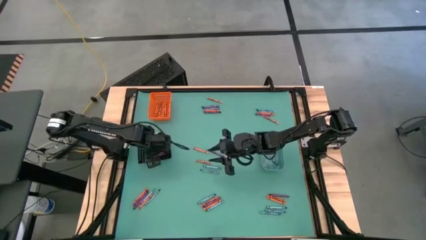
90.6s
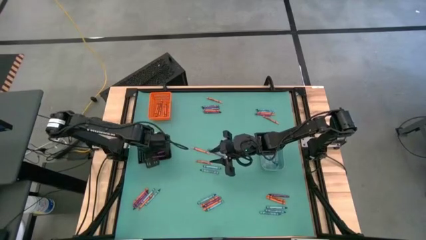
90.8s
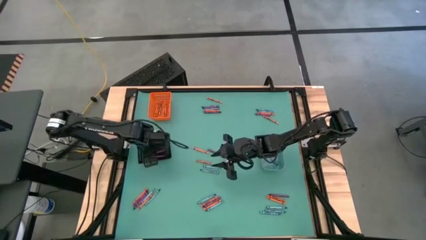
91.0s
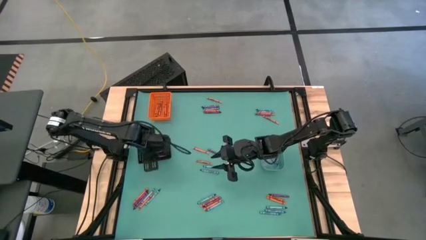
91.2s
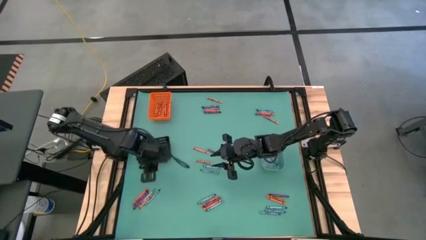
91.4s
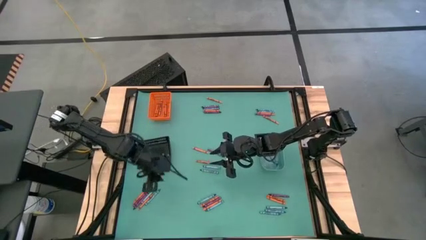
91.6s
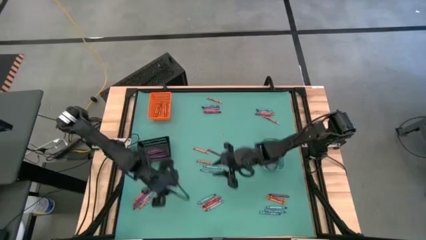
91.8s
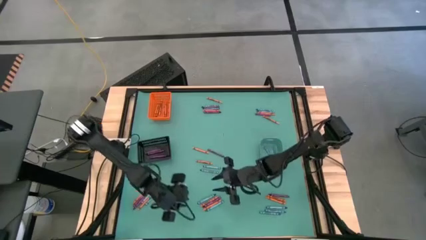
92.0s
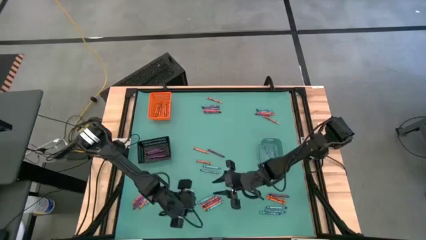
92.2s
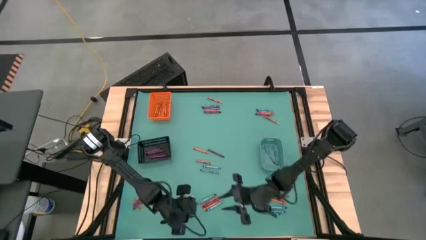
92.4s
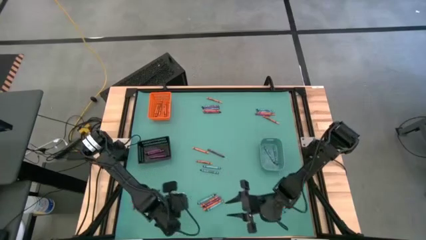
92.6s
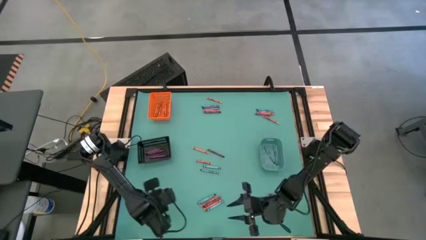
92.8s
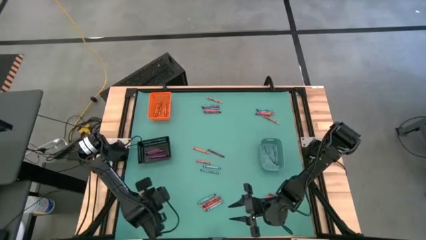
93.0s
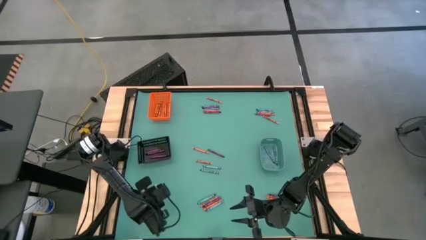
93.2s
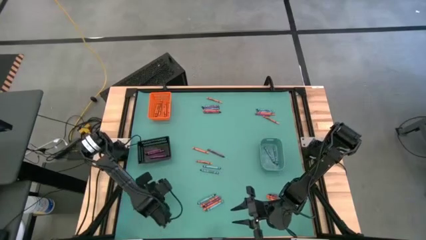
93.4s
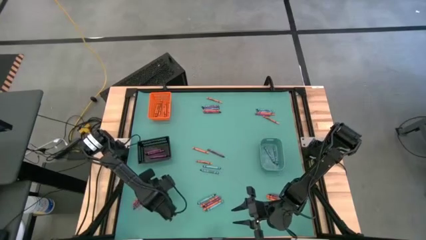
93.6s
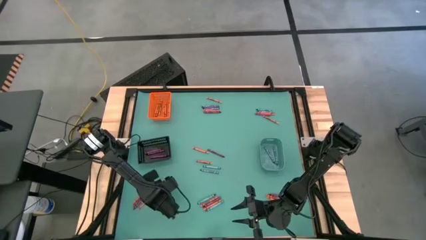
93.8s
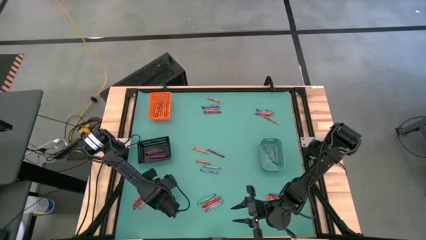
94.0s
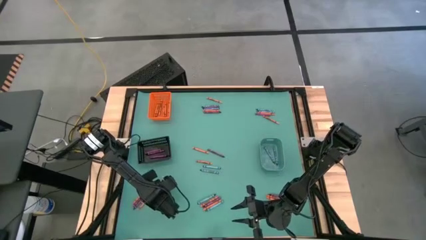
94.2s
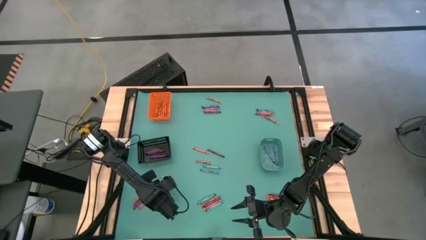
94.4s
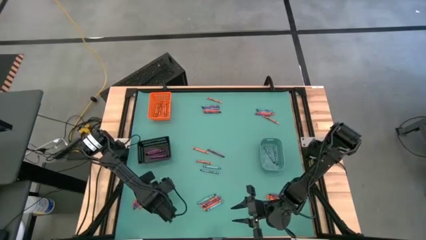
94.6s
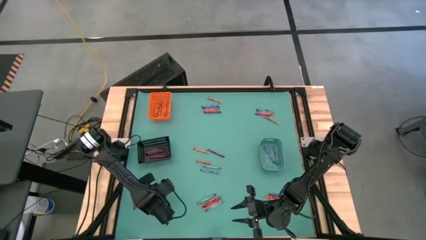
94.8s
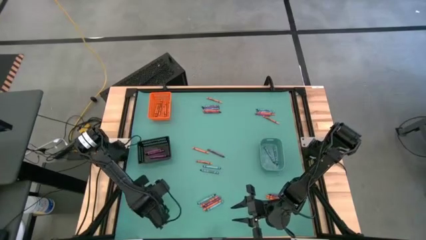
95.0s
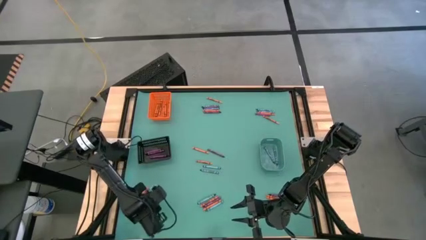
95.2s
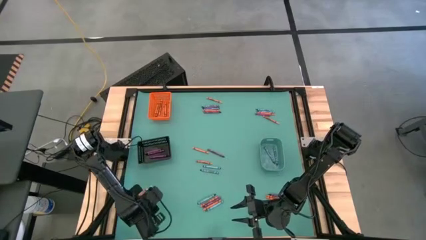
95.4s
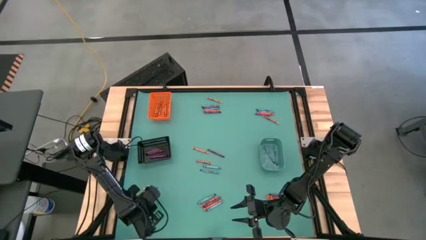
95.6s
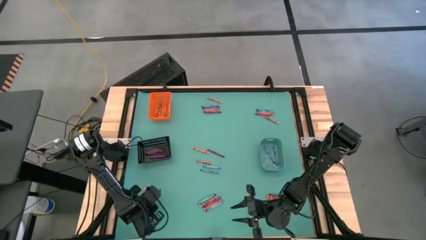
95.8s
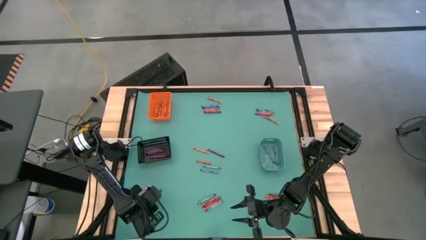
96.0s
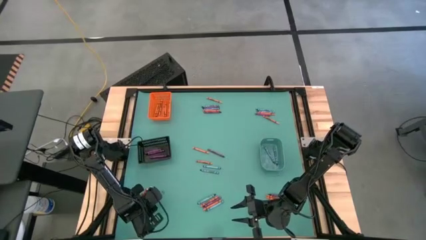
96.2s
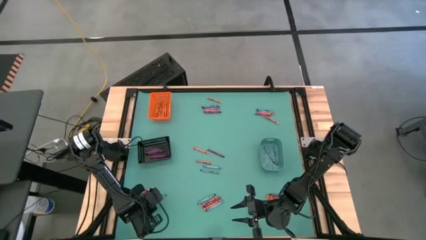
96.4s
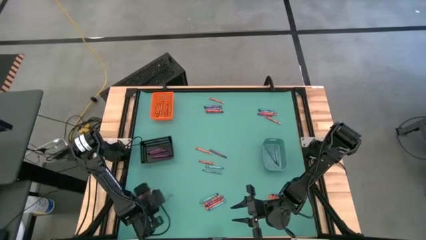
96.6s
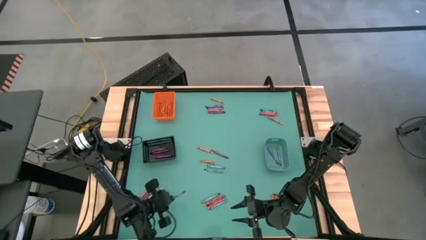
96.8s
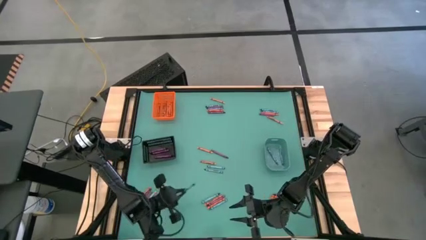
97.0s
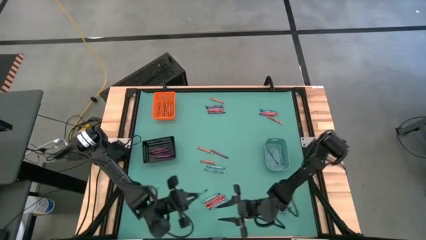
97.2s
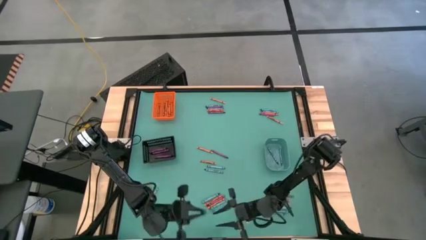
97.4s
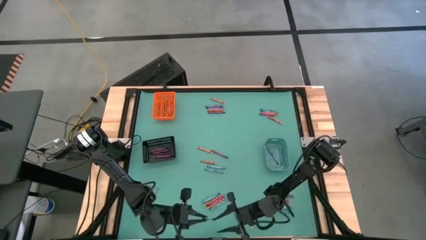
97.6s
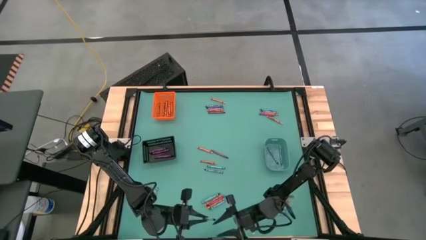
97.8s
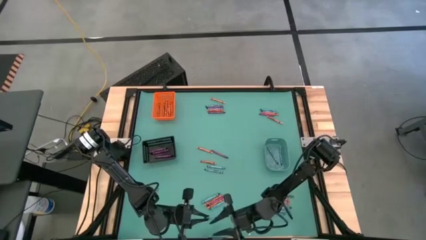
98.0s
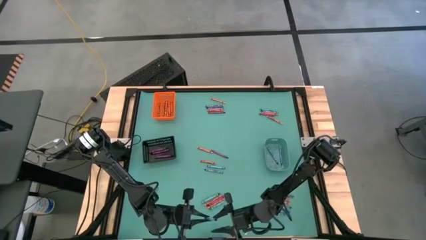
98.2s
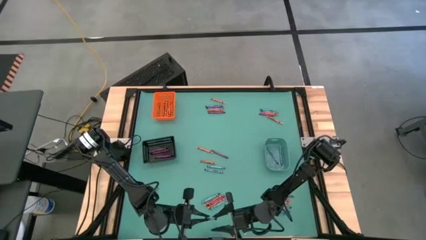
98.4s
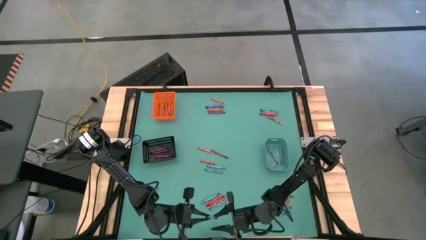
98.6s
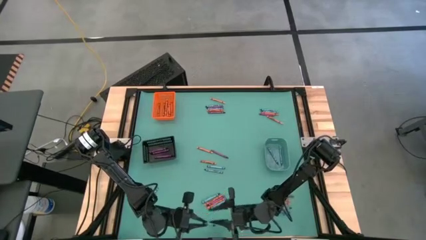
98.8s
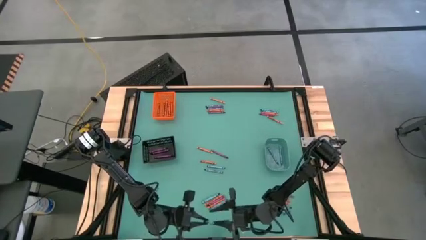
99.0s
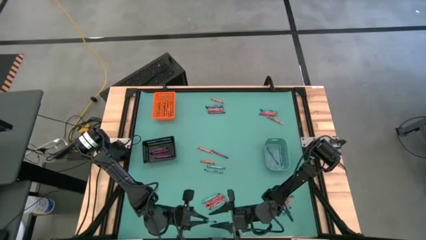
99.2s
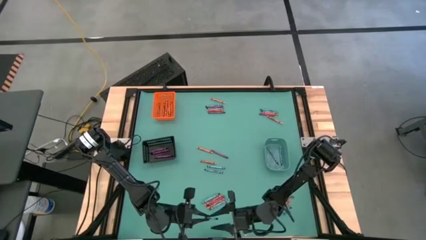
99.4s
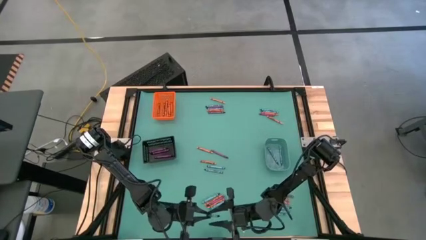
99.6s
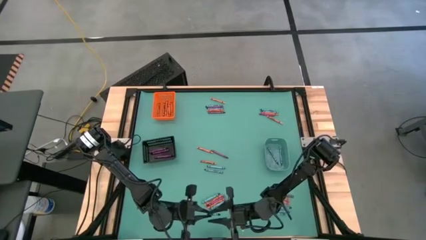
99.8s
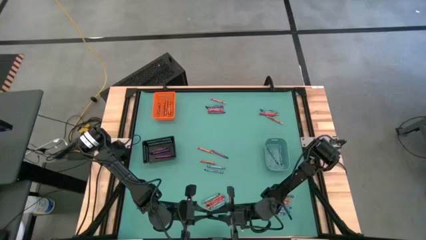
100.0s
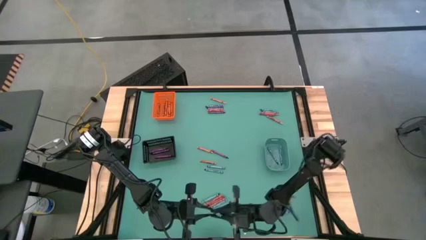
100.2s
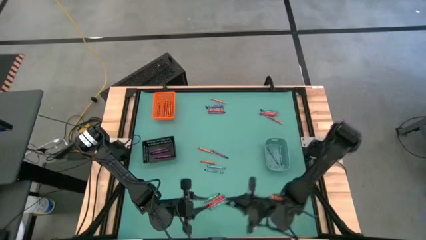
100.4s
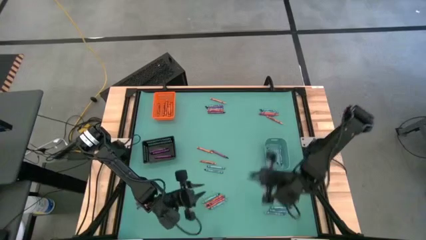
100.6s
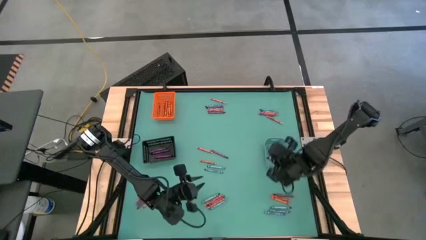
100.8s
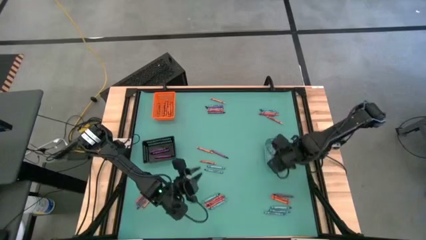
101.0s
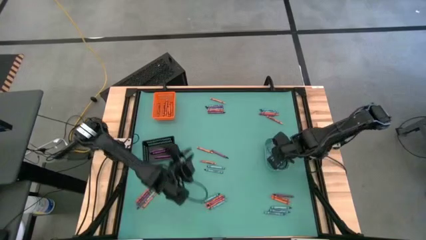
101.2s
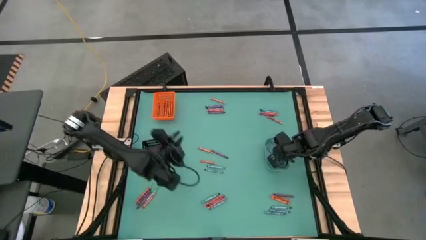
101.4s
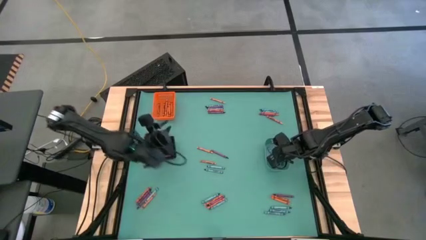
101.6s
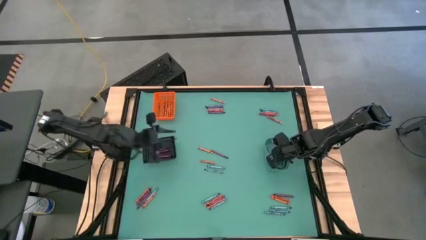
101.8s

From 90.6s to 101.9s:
Task: Sort crayons
Put the blue crayon into the blue bin

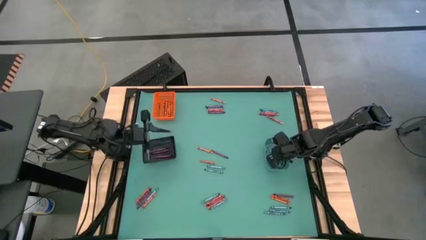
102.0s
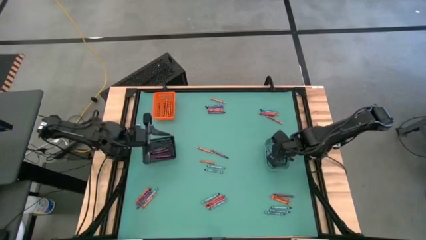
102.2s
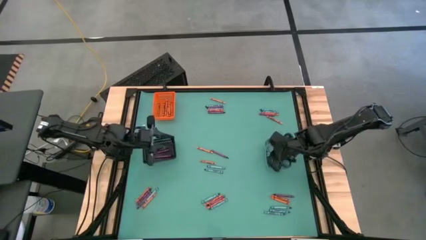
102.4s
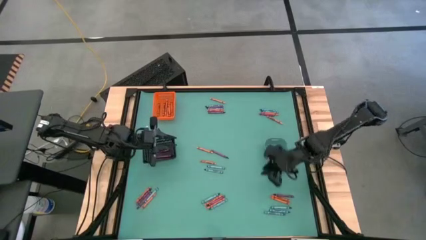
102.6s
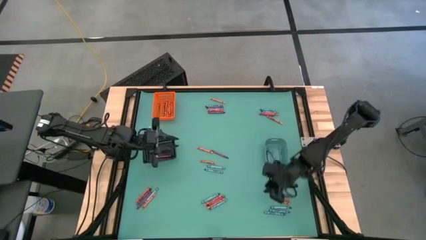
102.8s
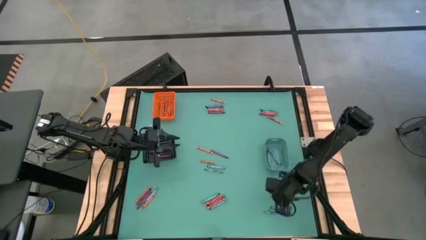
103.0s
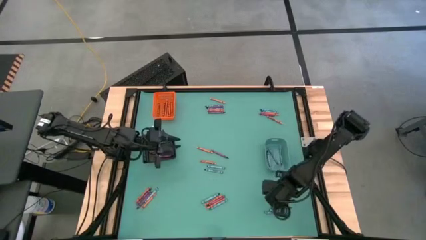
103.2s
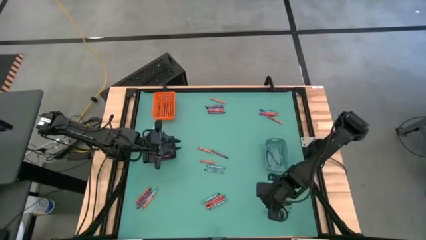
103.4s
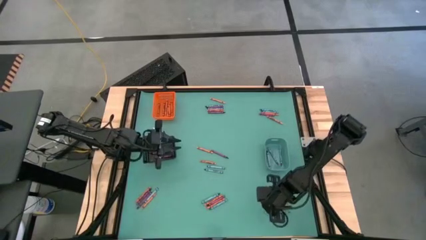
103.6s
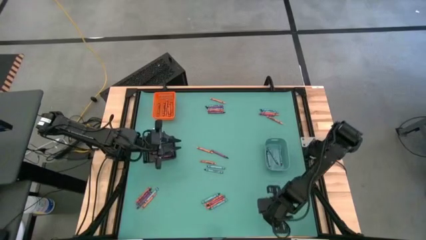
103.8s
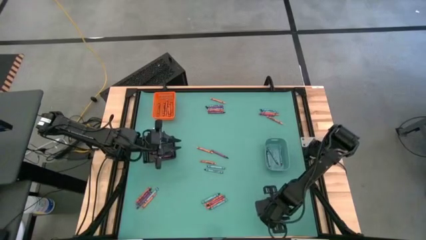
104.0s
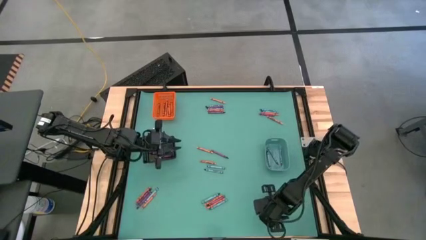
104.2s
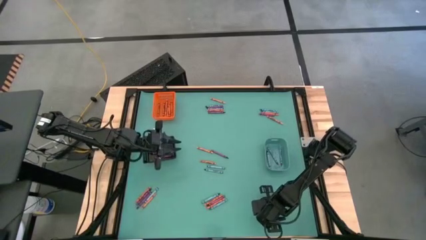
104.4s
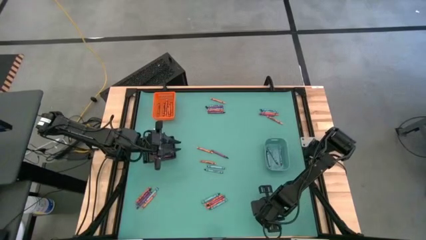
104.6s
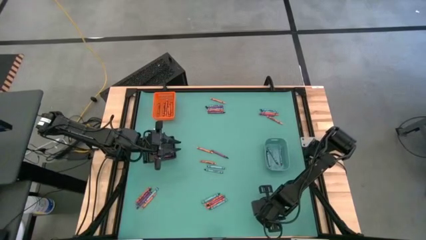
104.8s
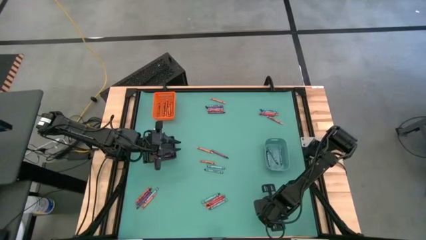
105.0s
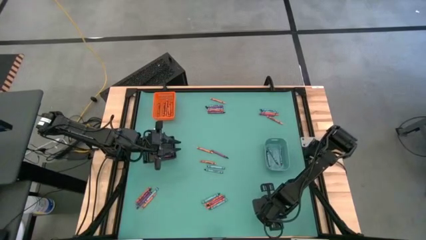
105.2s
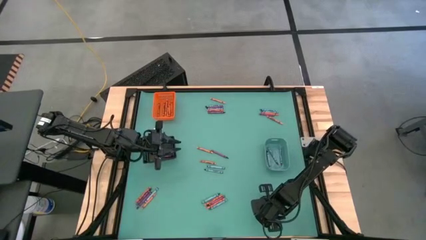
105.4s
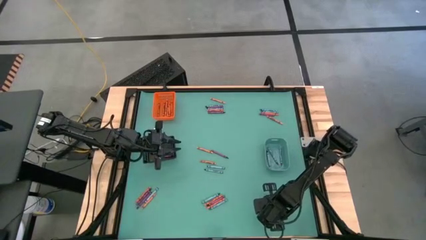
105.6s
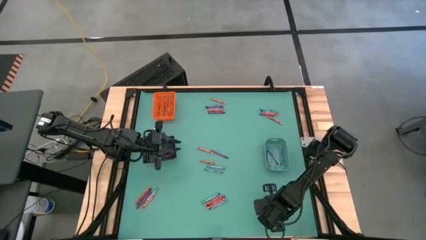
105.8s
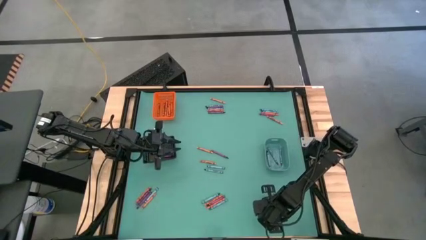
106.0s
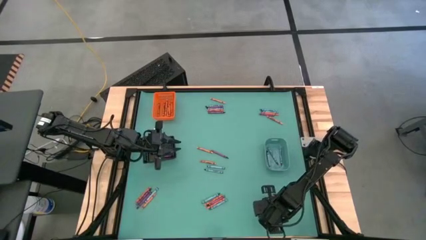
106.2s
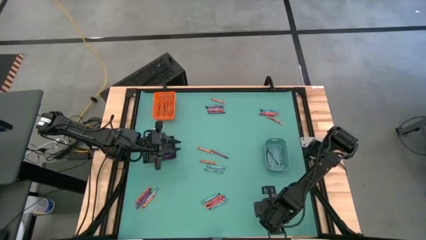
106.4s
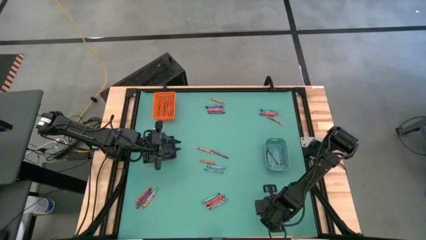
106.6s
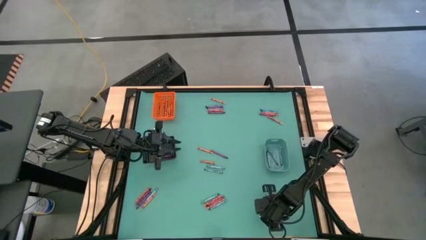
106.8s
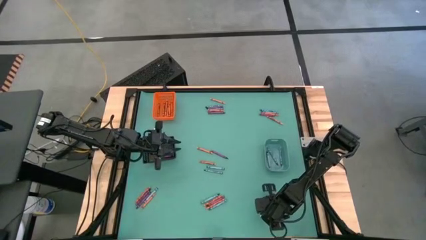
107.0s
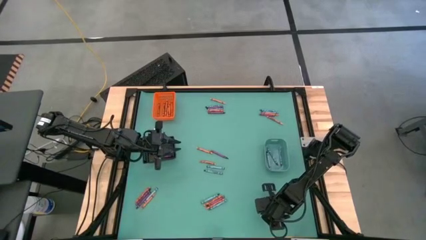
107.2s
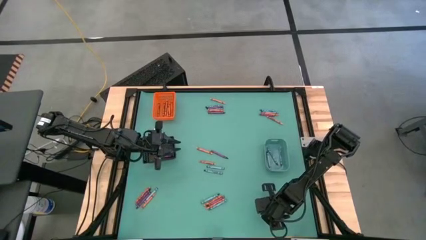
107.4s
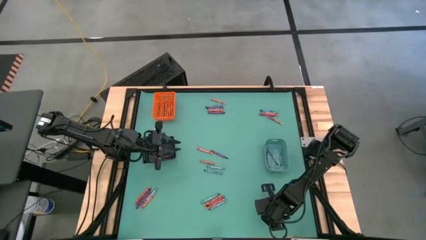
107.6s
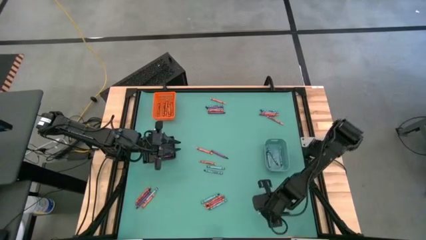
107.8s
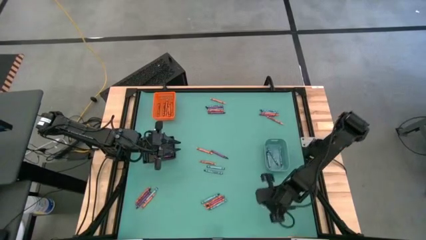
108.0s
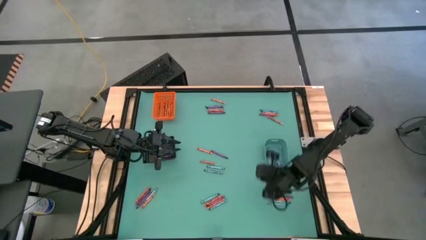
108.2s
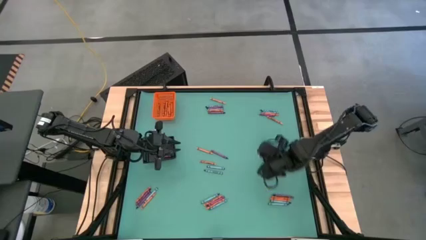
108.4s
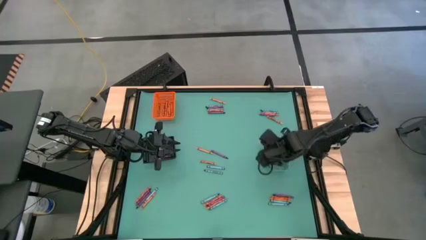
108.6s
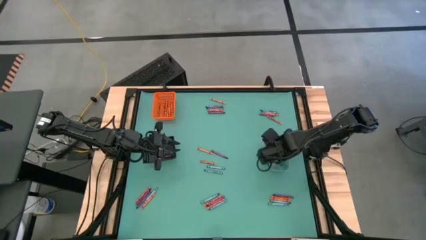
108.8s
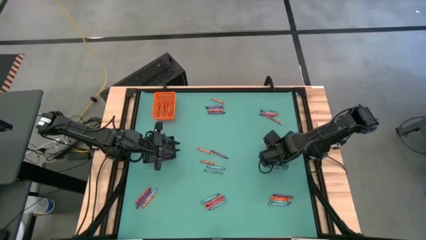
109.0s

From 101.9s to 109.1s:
Put the light blue crayon into the blue bin
